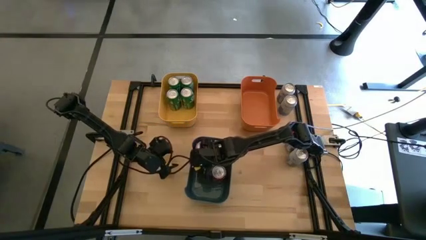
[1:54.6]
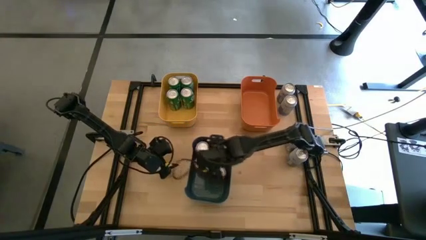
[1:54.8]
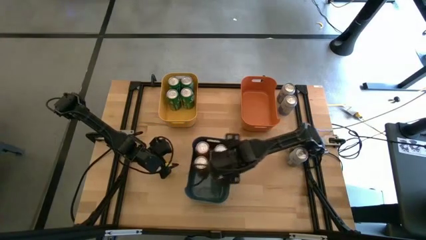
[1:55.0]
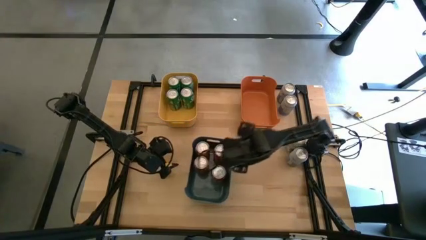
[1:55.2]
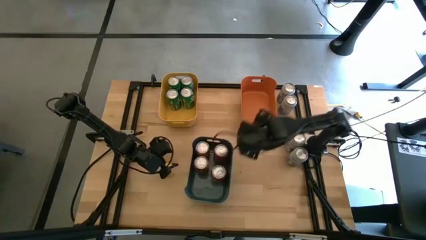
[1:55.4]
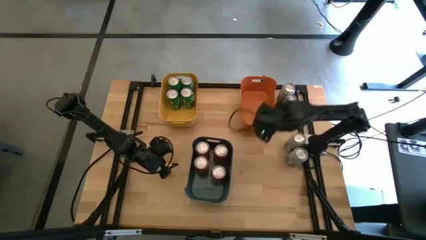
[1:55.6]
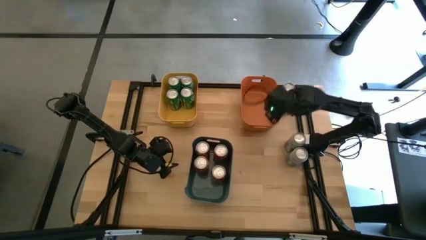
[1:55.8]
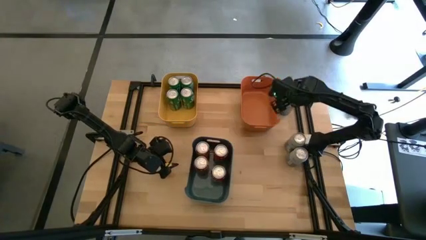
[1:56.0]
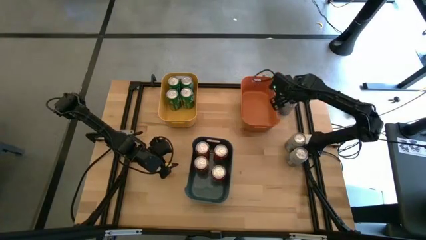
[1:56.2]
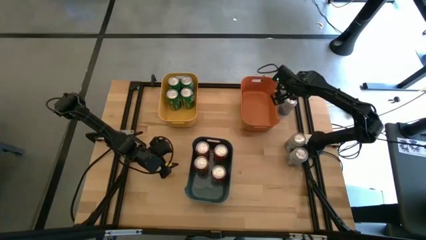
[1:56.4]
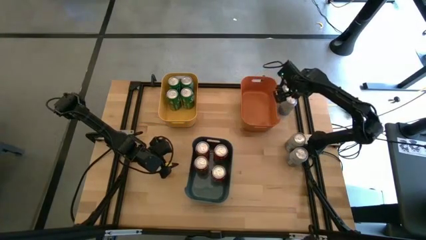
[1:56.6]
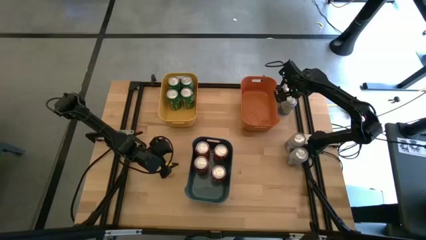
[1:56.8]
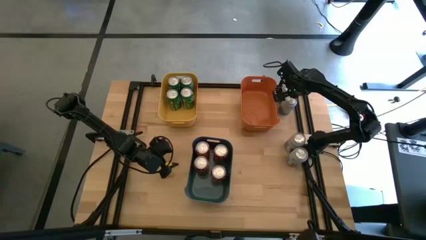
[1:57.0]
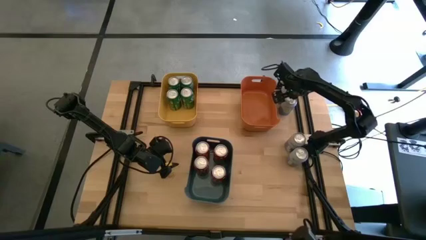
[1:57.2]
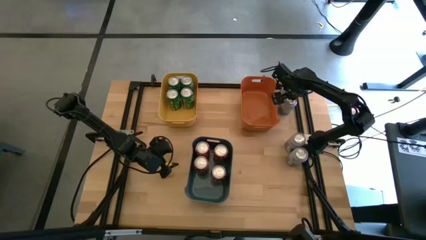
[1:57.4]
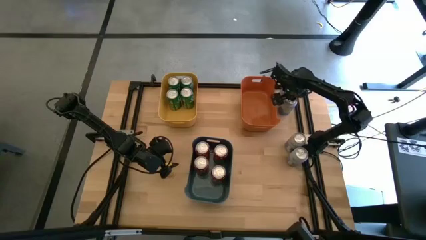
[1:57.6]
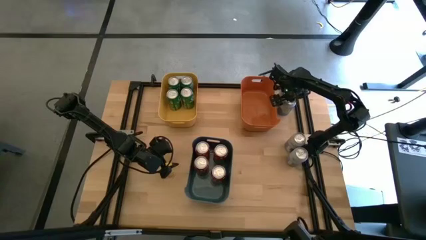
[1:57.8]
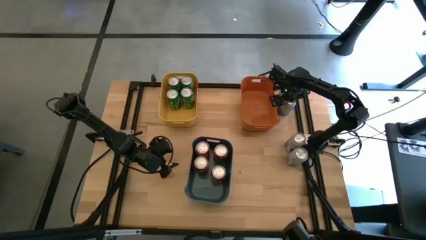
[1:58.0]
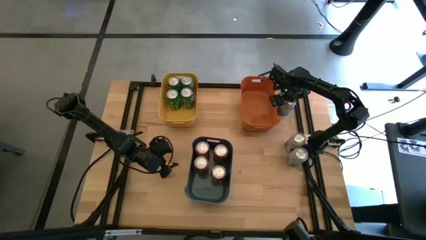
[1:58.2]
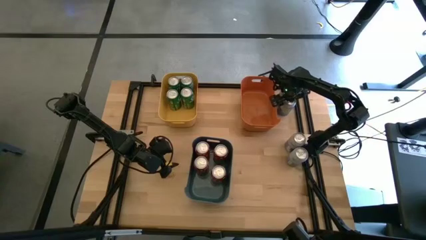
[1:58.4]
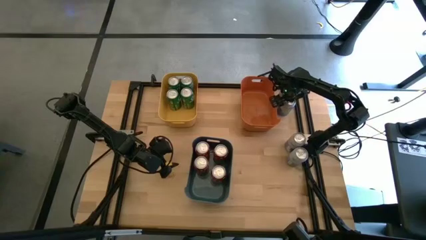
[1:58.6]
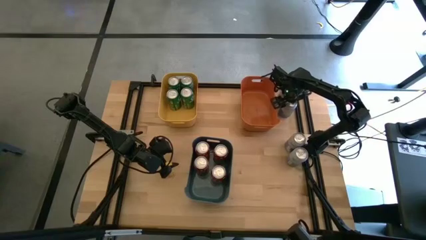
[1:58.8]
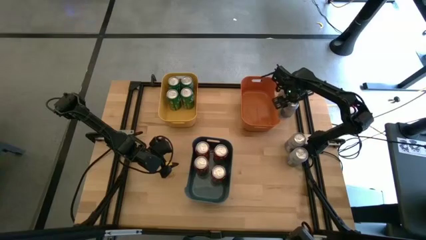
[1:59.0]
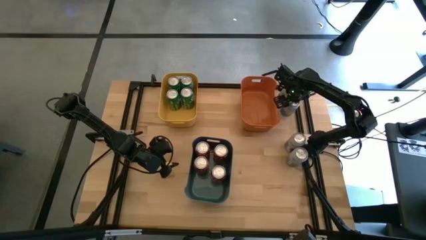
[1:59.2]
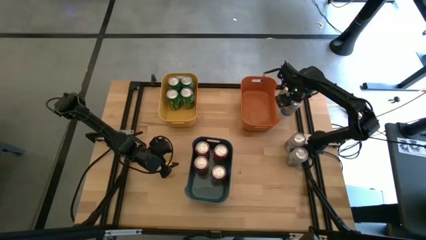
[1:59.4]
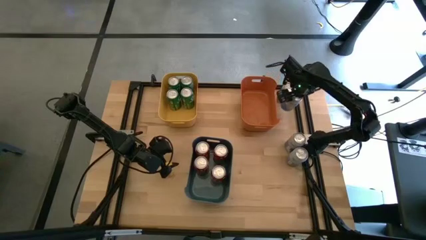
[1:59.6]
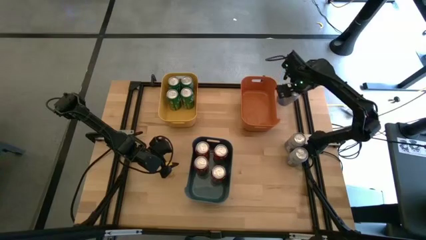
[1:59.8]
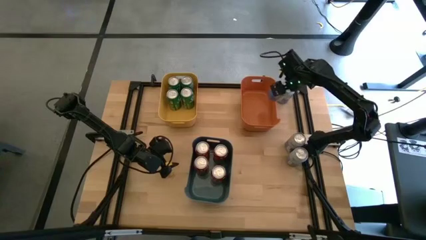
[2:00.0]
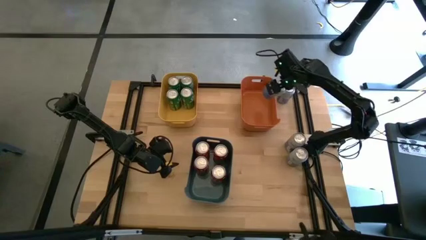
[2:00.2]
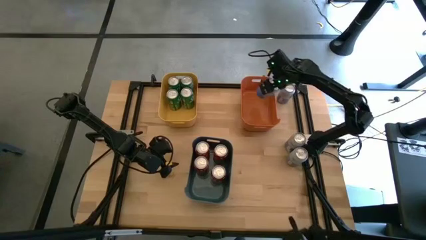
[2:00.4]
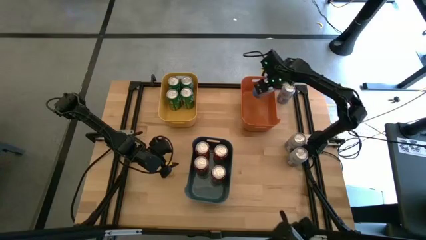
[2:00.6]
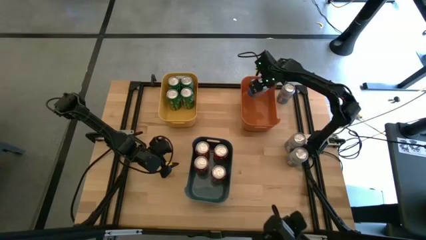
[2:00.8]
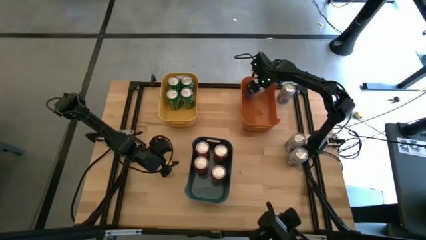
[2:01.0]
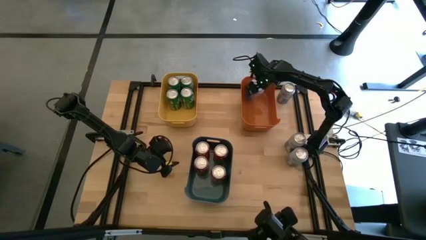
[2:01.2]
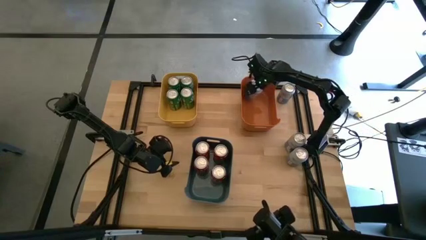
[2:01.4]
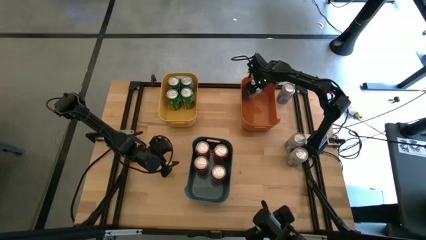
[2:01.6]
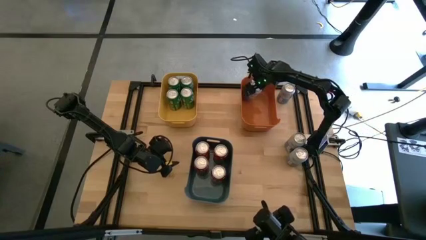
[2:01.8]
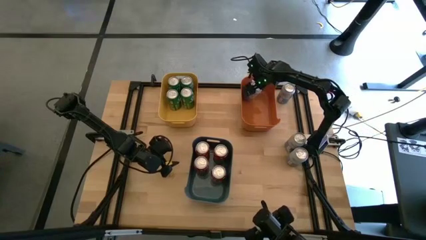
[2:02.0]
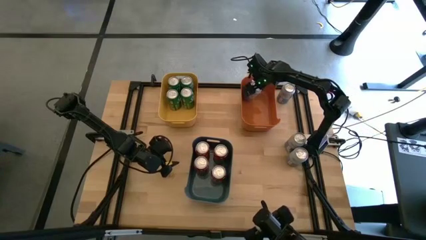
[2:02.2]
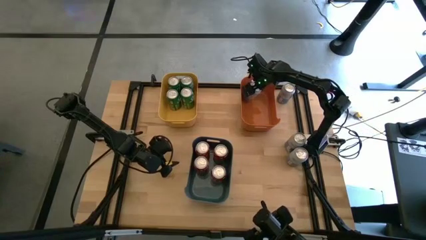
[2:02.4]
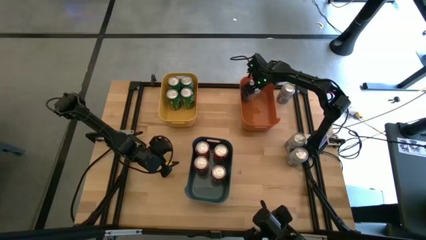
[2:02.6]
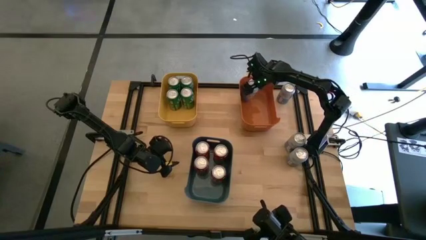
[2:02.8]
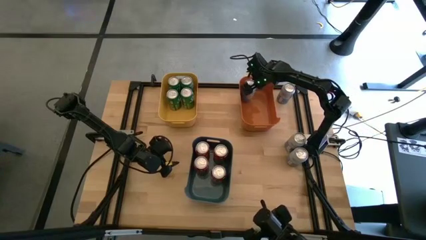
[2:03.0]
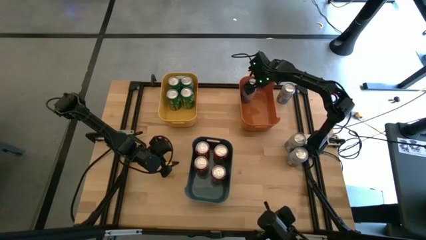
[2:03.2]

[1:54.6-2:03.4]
Task: Sort soda cans
Put the blue-white soda can into the orange bin

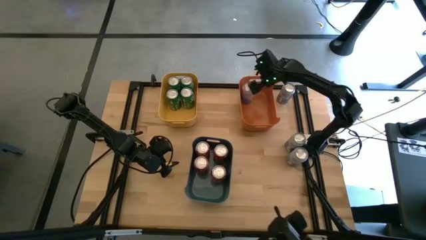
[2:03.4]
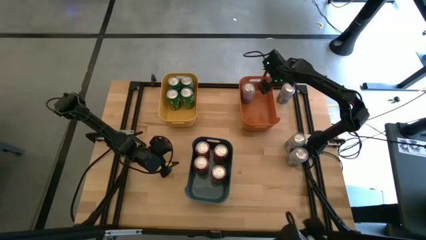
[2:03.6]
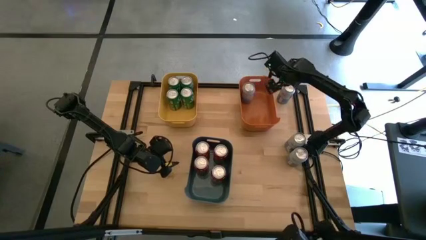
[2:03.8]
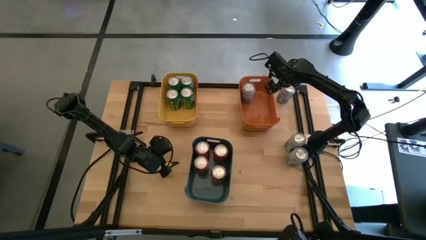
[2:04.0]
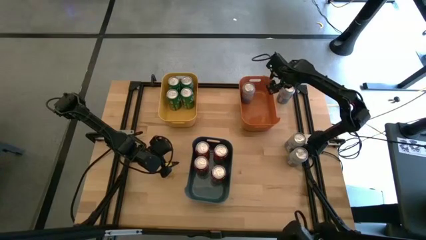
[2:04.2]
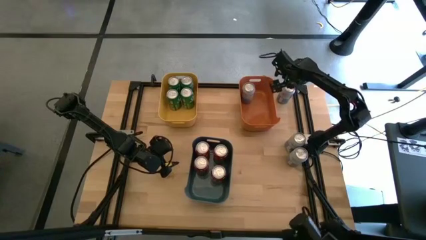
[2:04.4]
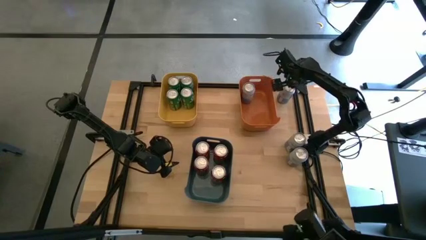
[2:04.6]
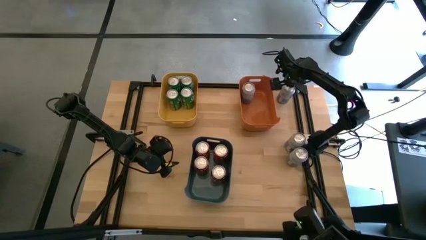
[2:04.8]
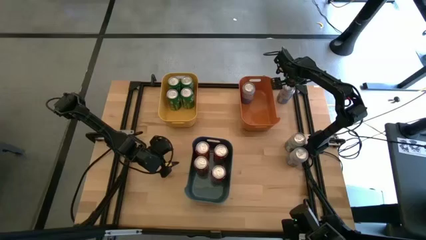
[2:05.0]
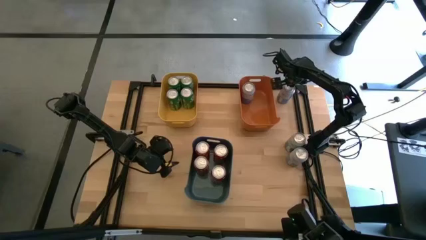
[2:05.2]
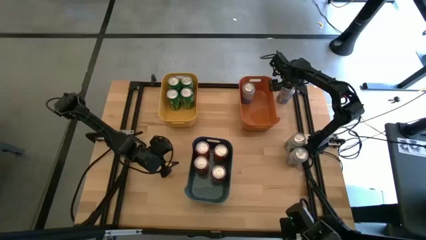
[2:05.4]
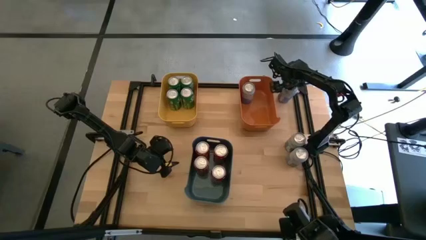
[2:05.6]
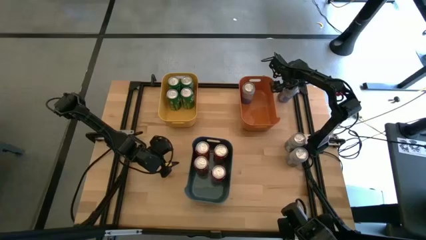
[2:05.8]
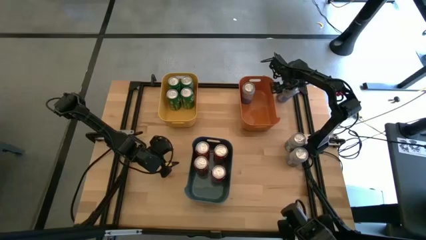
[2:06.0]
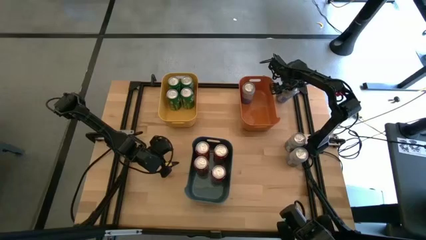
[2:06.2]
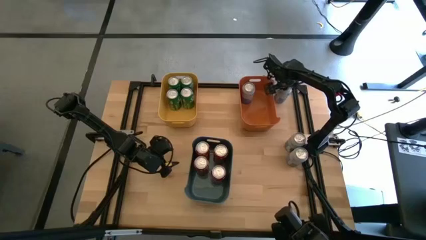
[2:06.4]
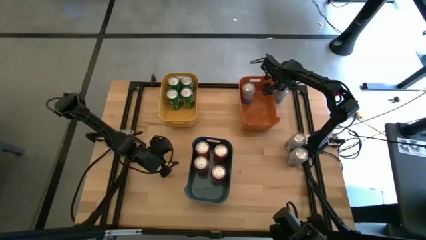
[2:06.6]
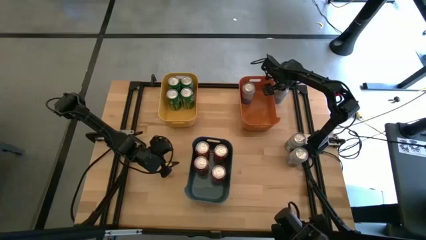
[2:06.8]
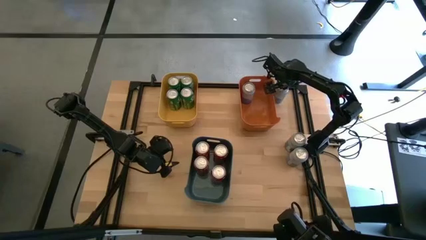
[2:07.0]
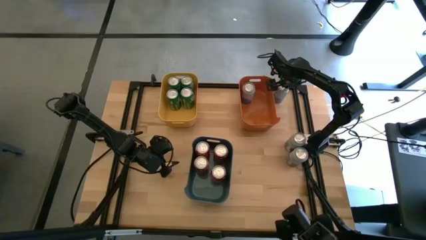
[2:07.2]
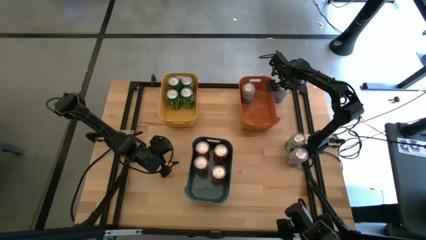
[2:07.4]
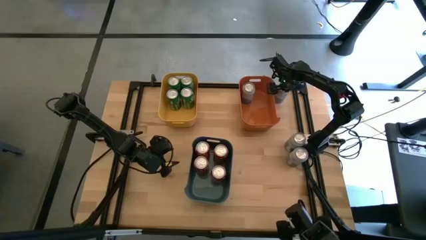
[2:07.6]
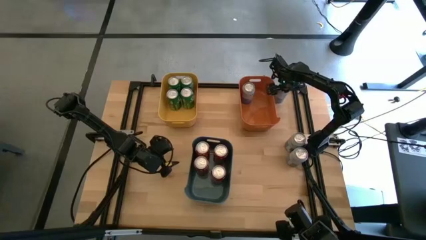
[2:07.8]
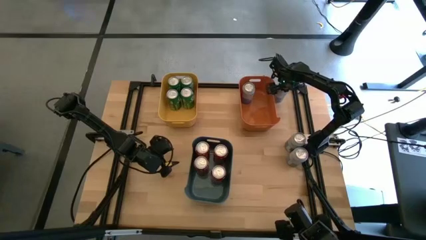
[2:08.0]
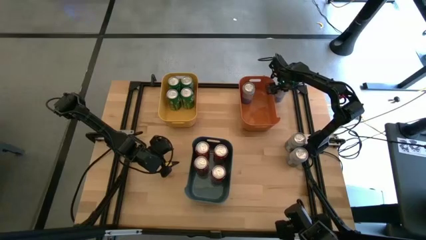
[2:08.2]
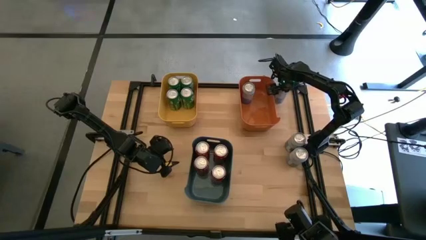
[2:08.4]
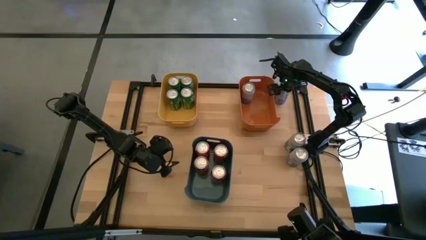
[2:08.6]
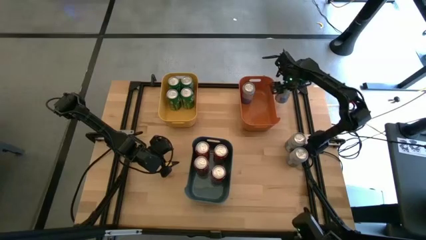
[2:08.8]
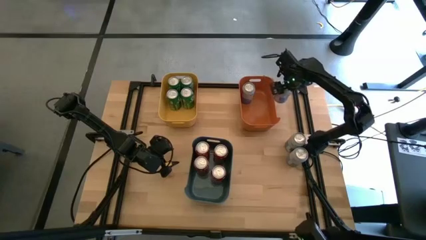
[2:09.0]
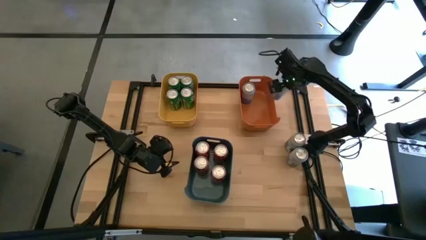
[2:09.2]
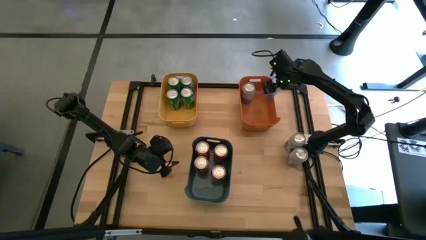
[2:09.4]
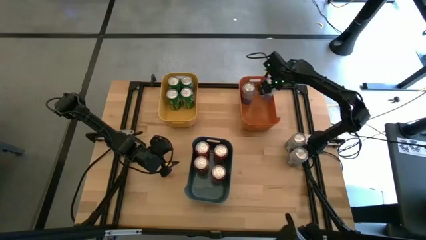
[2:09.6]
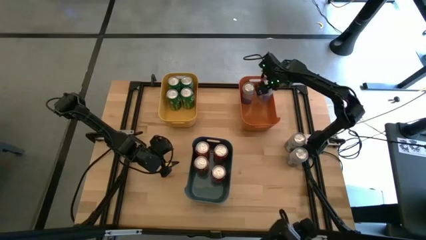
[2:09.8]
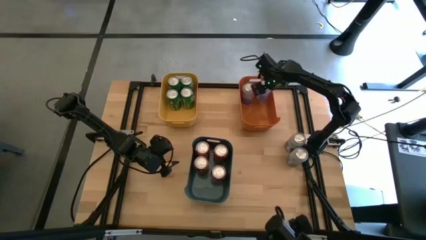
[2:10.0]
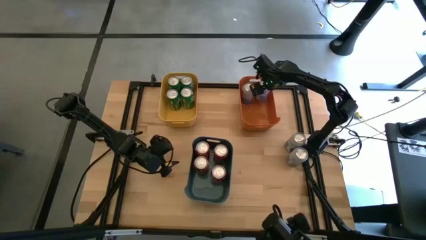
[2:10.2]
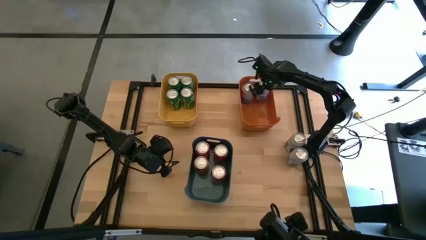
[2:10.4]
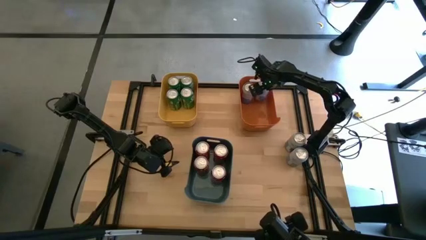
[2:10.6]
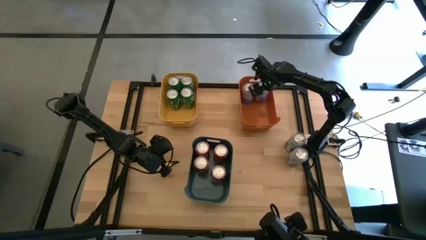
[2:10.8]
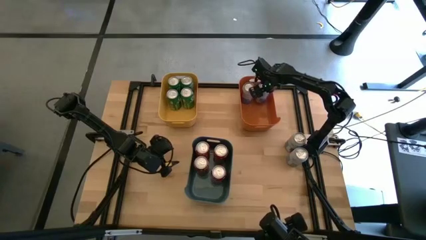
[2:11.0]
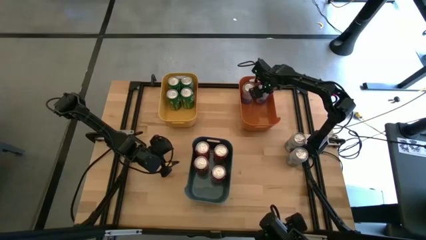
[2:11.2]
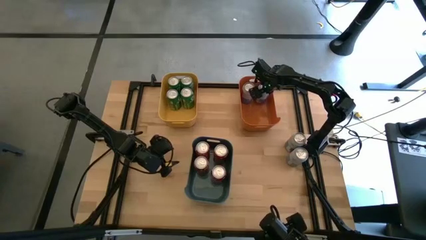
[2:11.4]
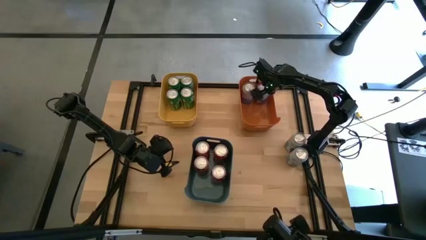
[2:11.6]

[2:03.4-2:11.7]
Put the blue-white soda can into the orange bin
